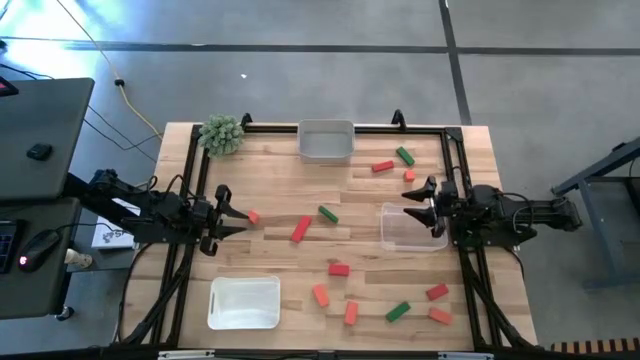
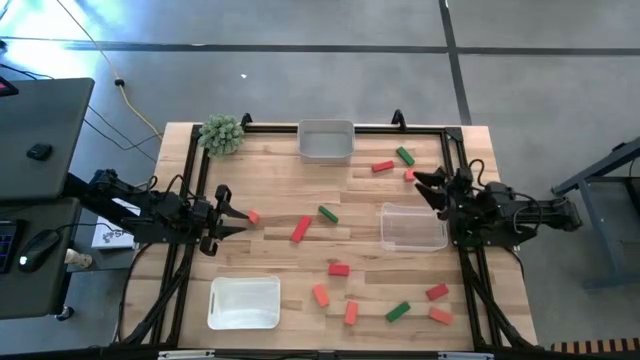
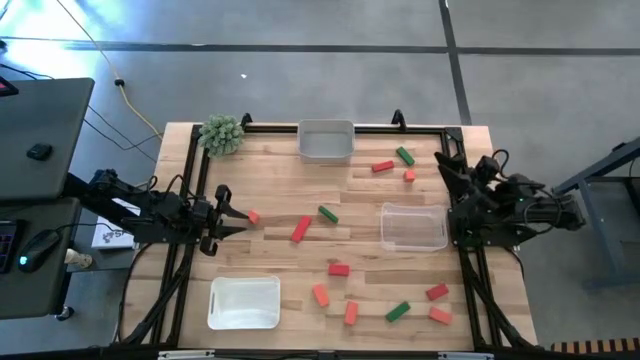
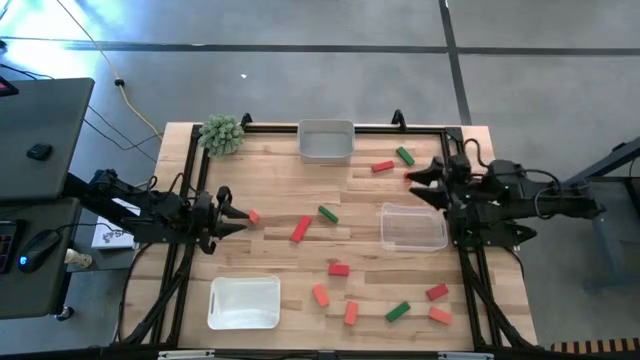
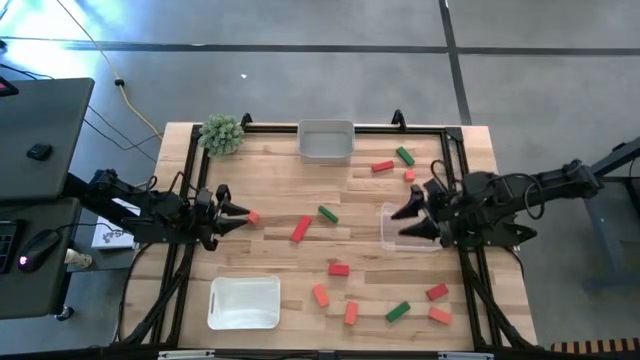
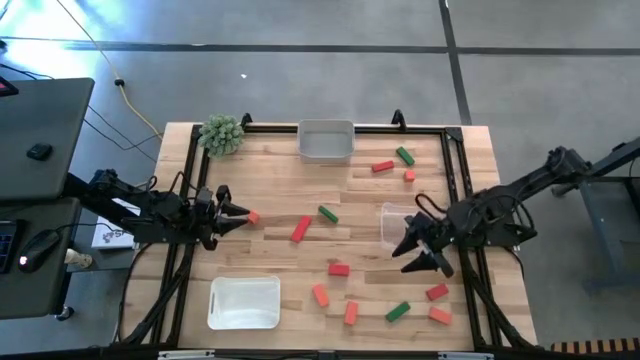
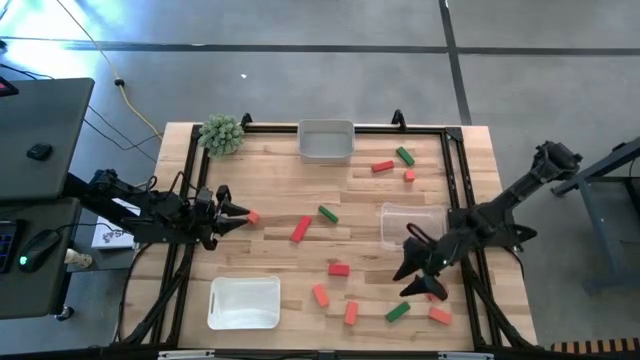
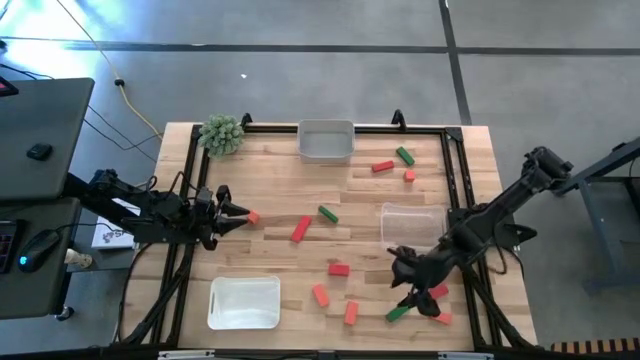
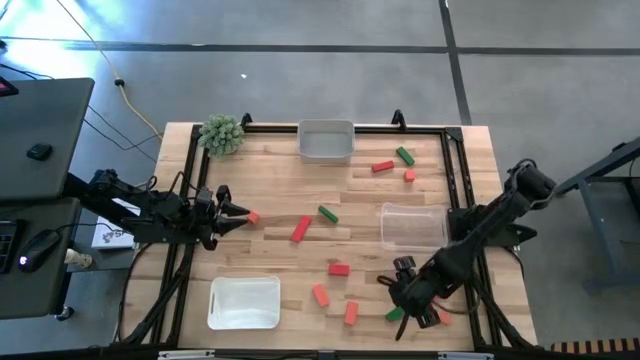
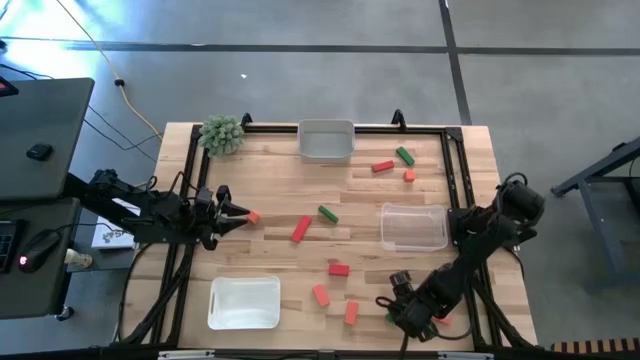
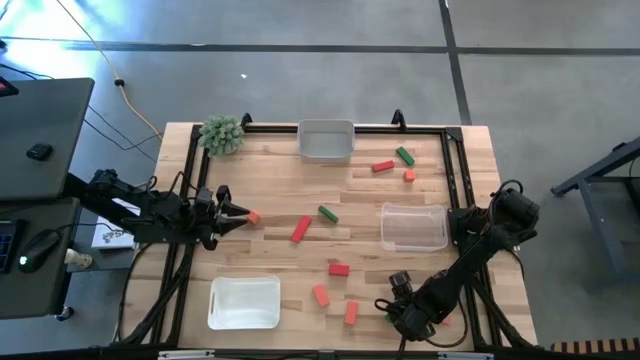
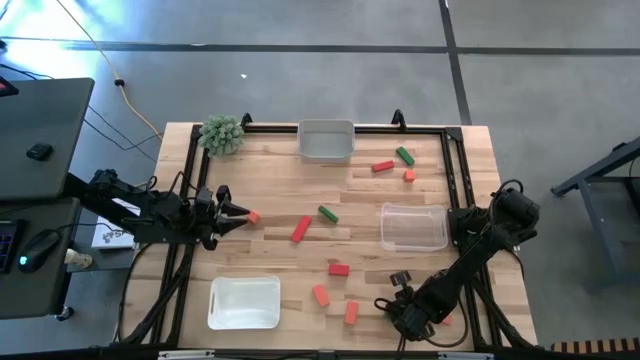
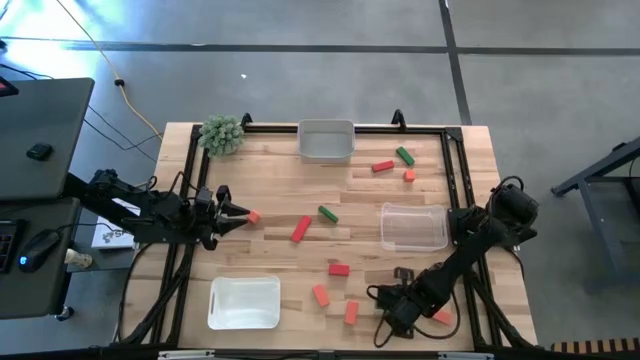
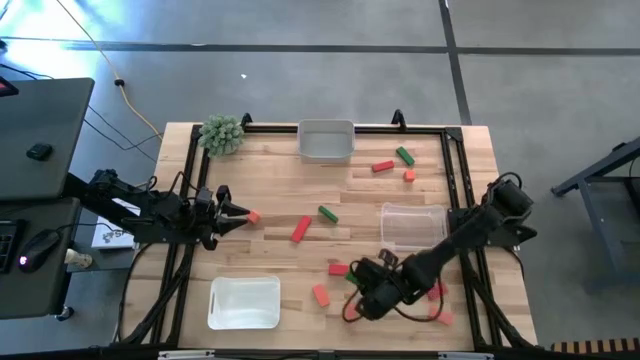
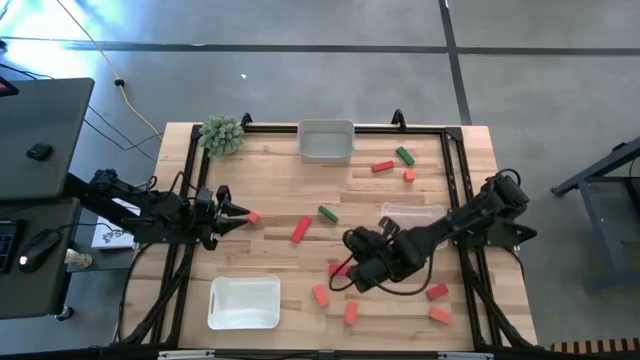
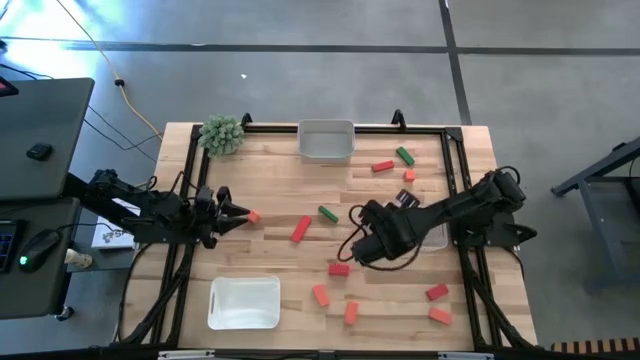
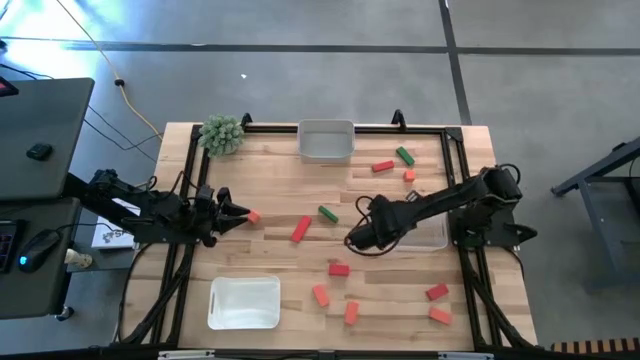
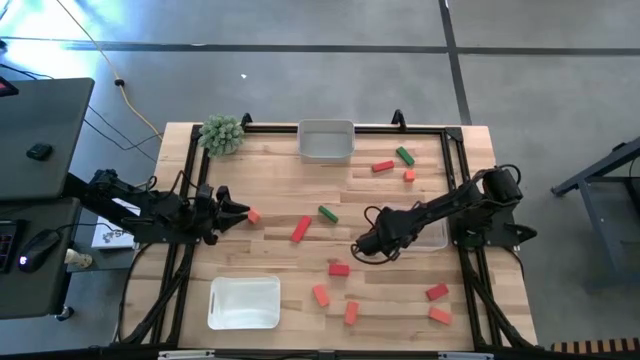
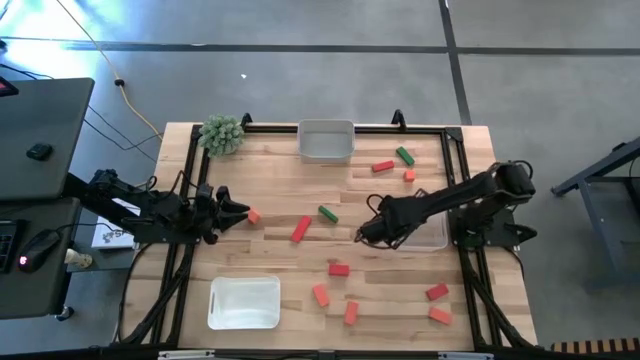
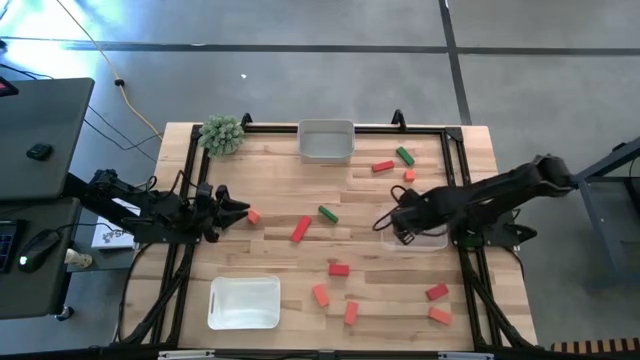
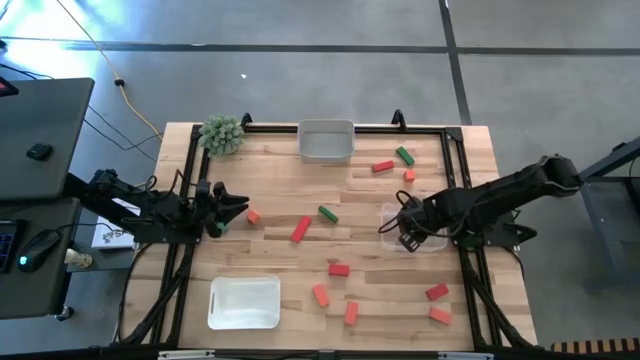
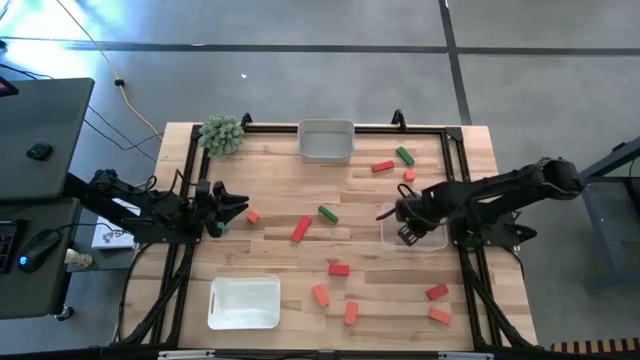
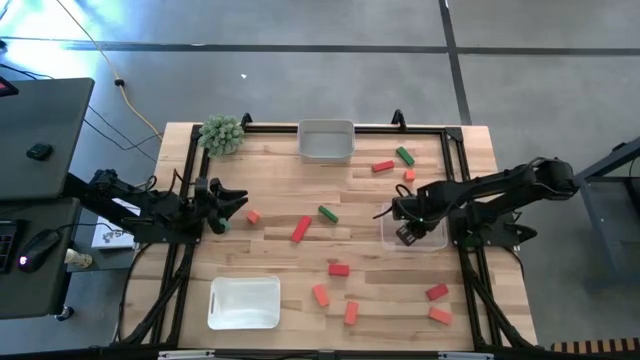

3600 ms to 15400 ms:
Task: Sort & place blocks by color
Put the green wooden block into the transparent bin

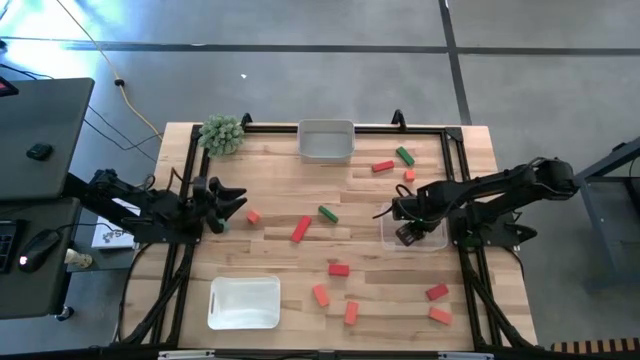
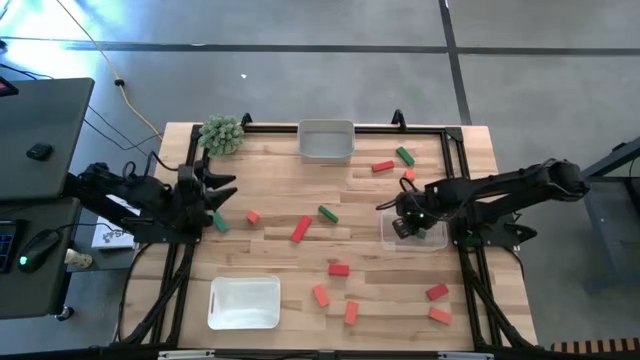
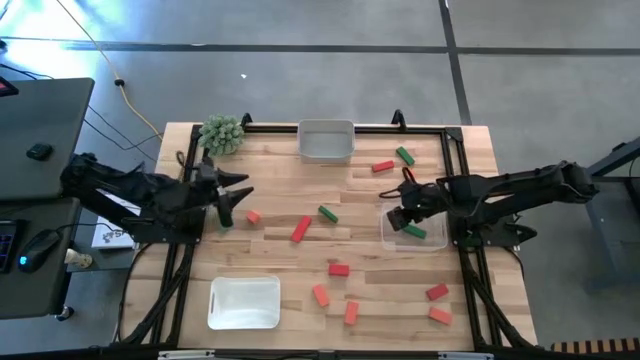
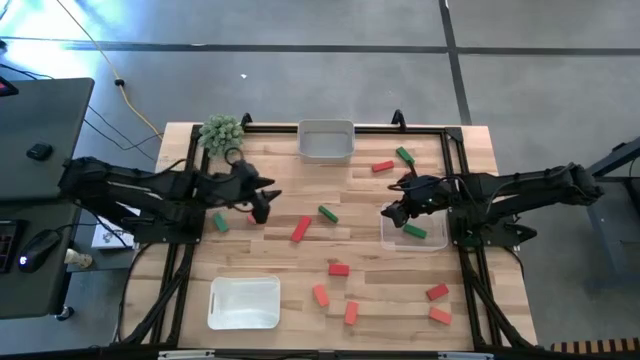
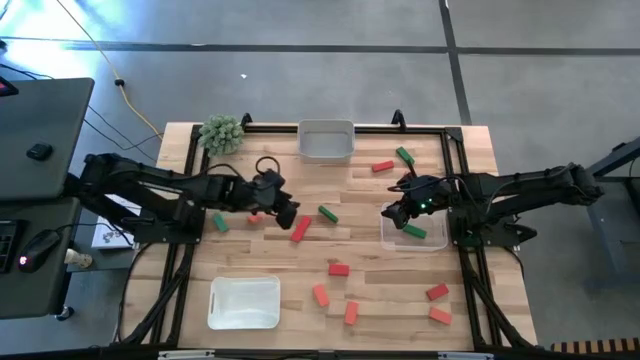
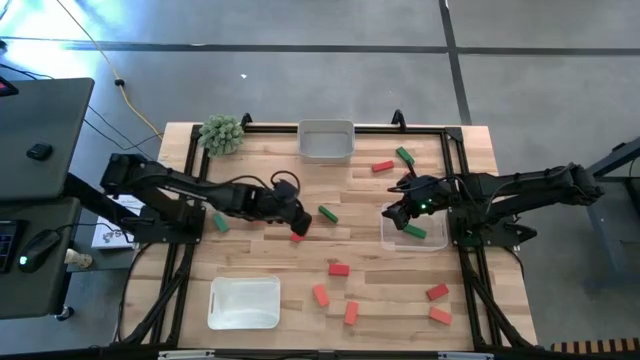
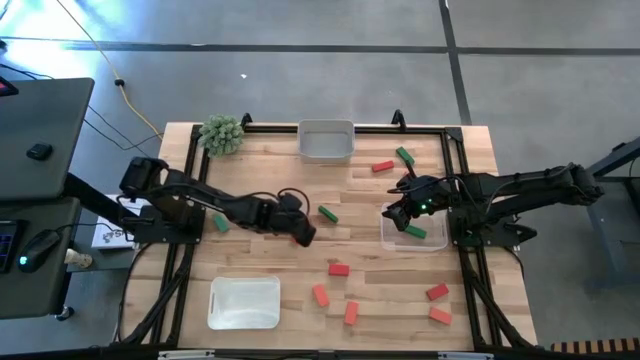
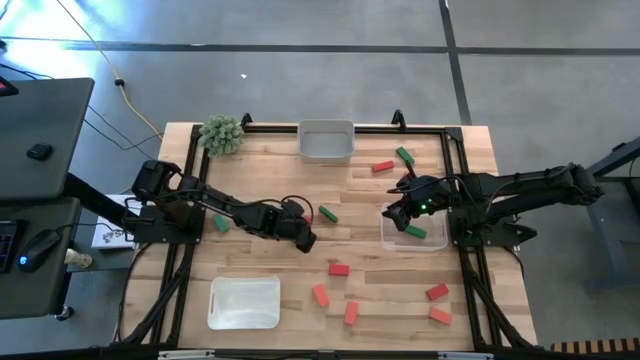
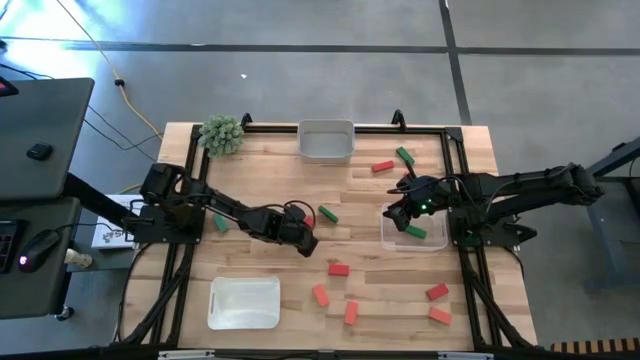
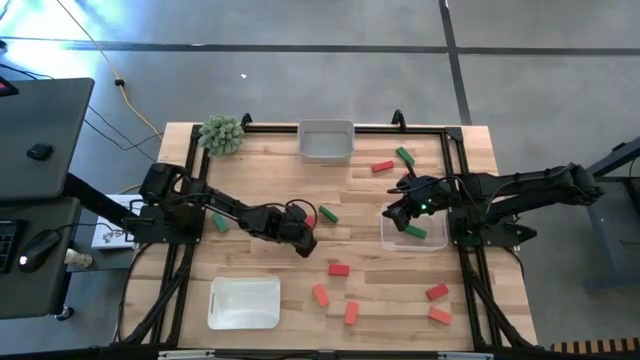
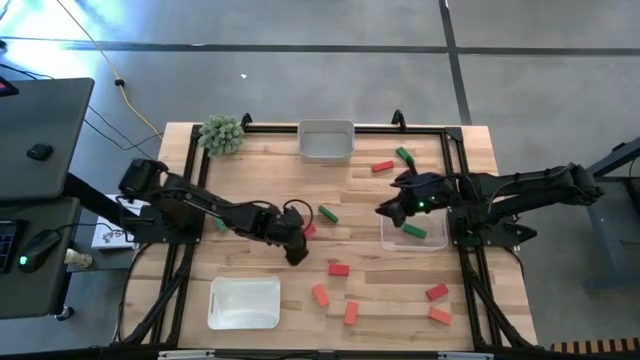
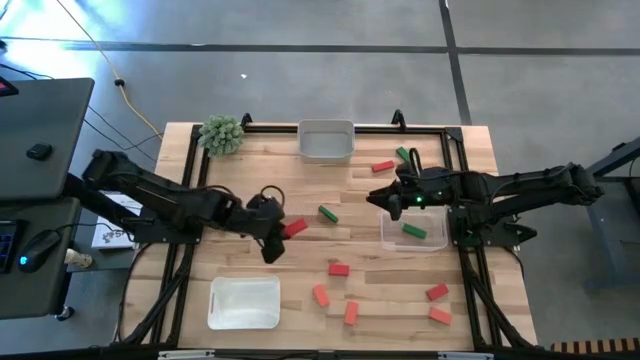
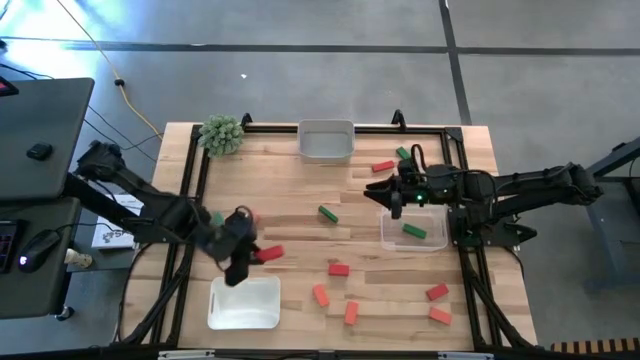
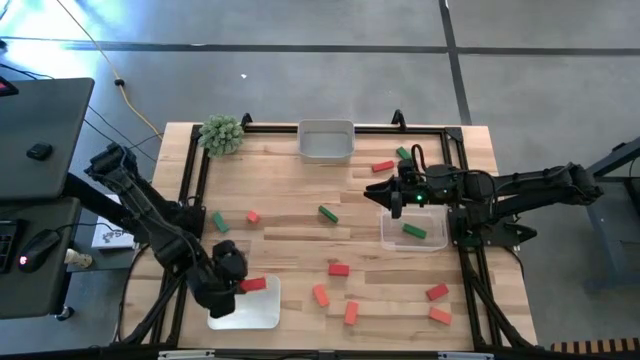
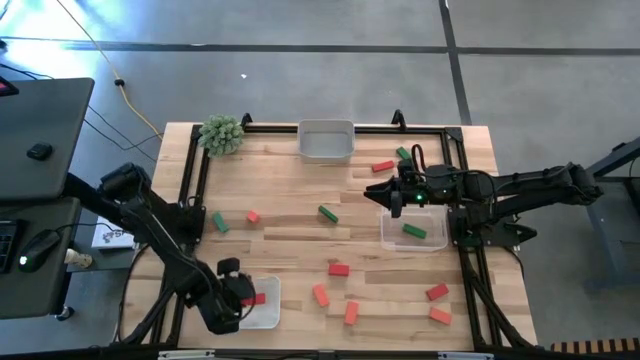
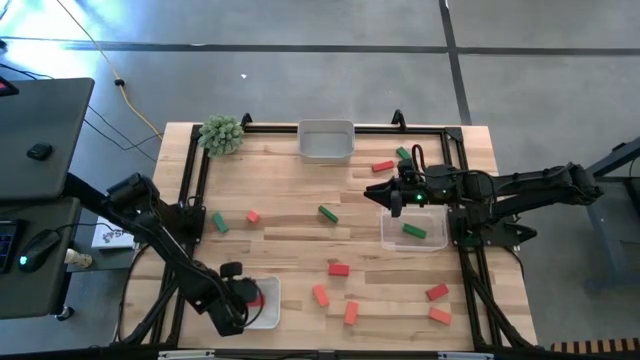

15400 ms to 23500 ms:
Put the red wooden block into the white bin
